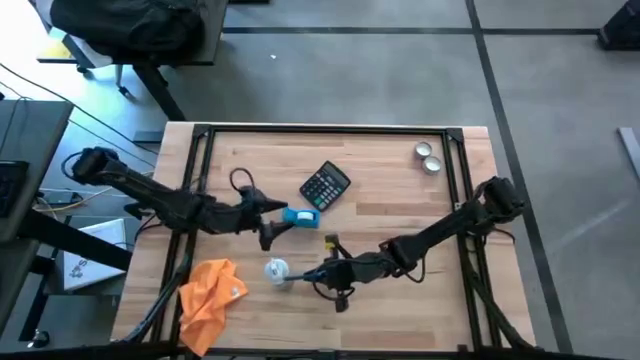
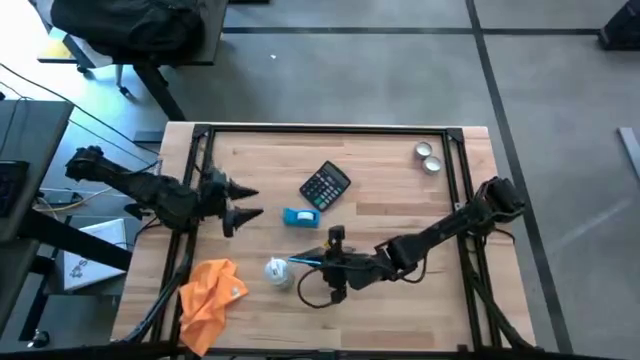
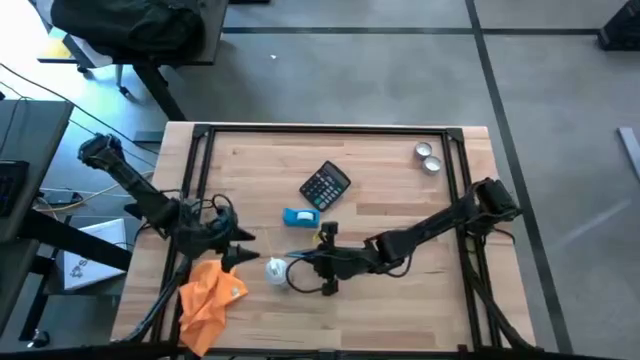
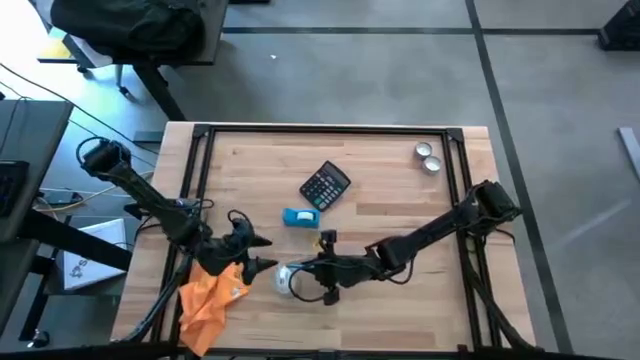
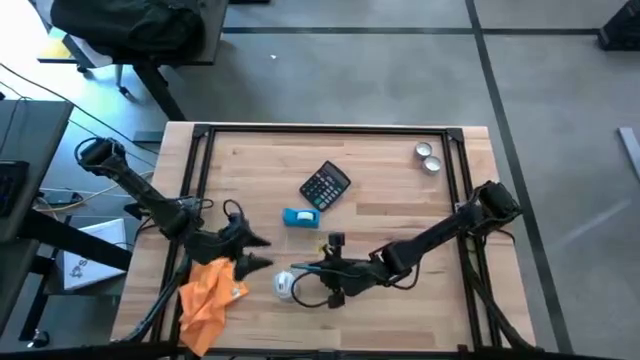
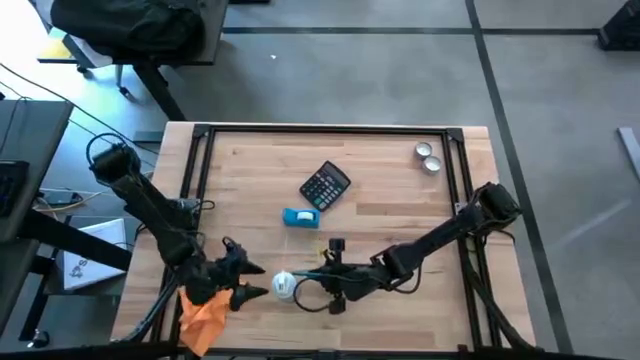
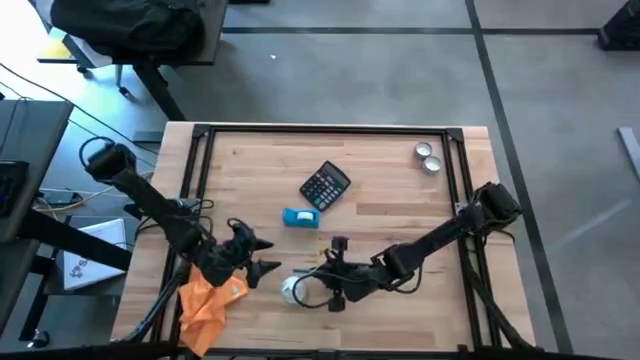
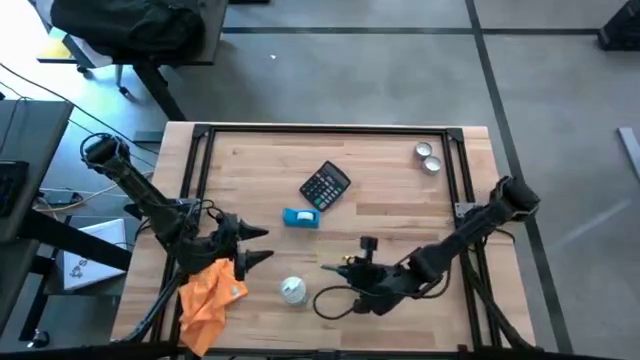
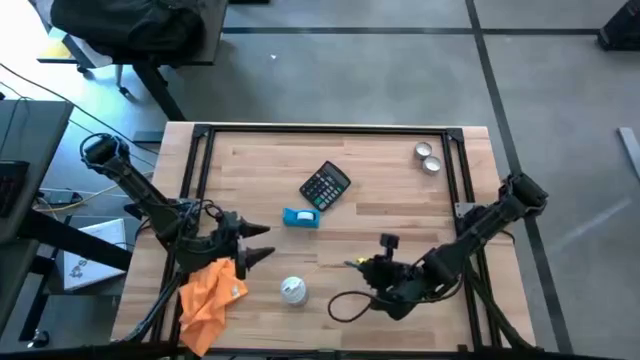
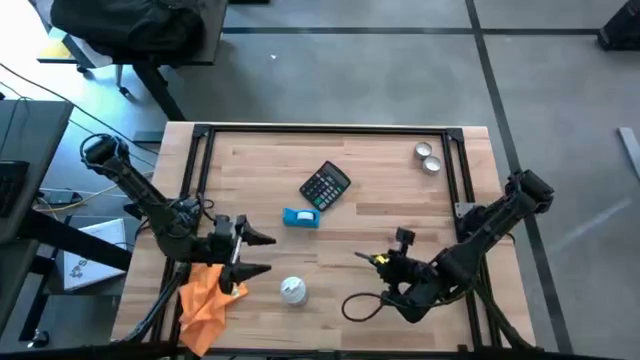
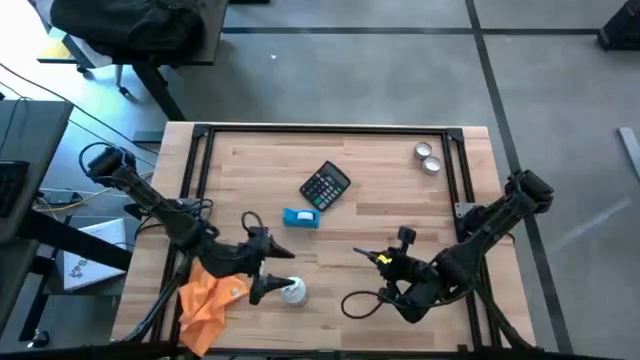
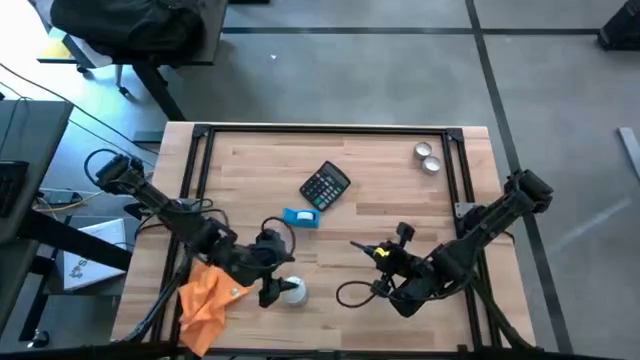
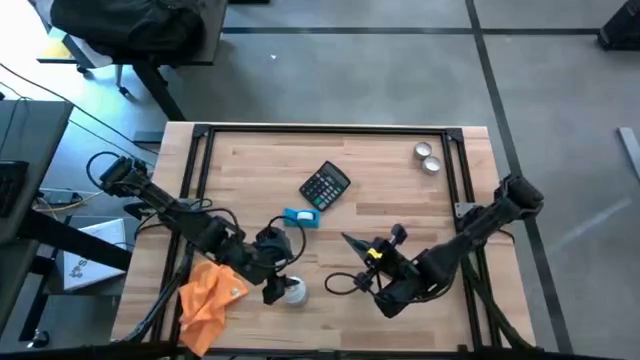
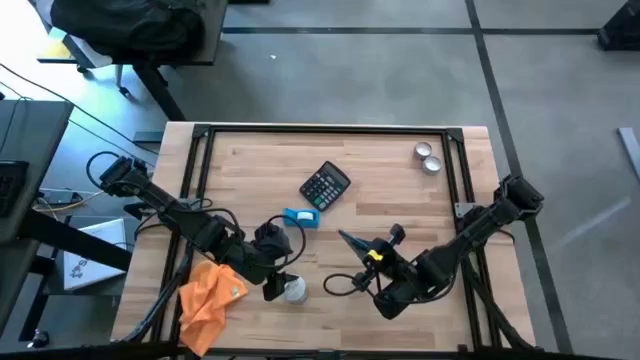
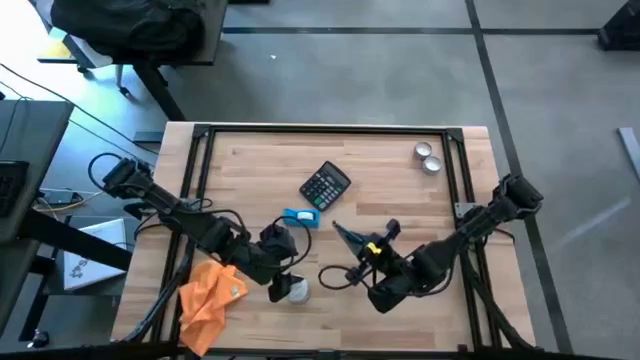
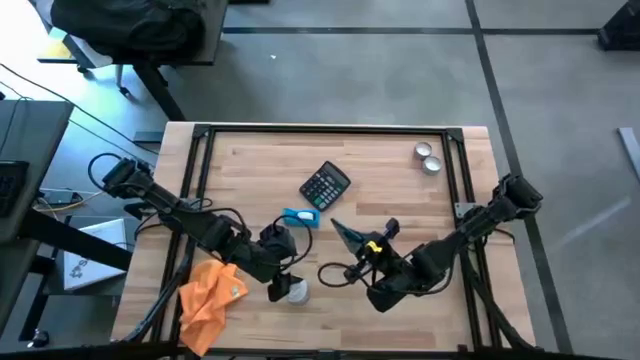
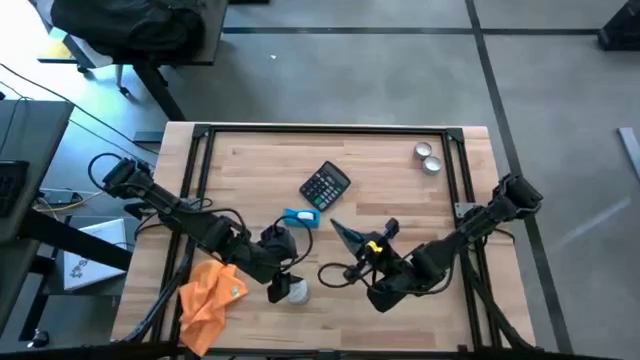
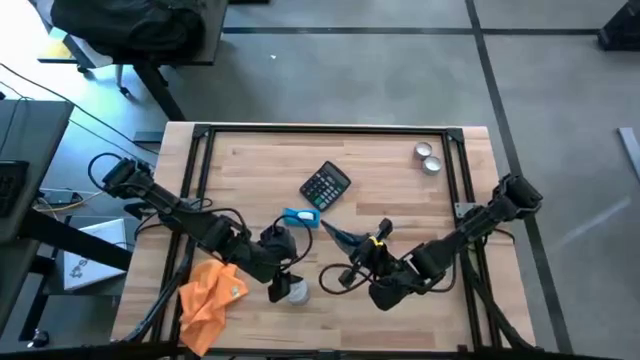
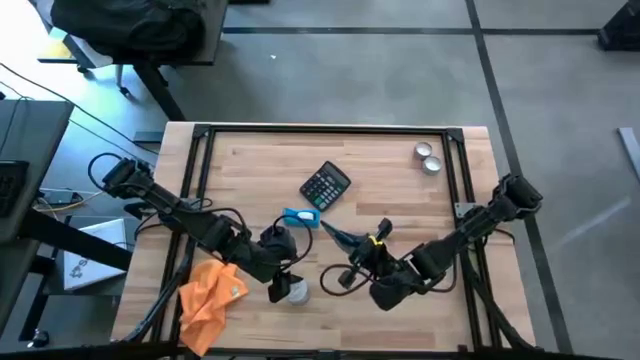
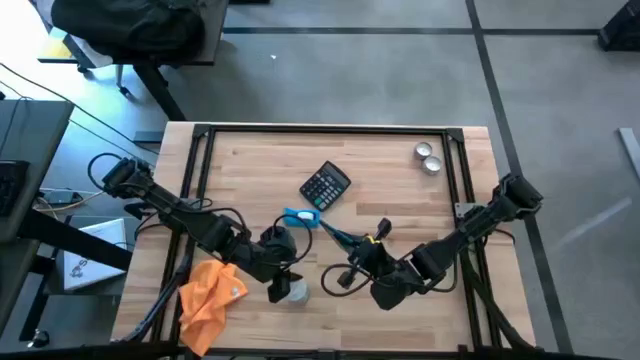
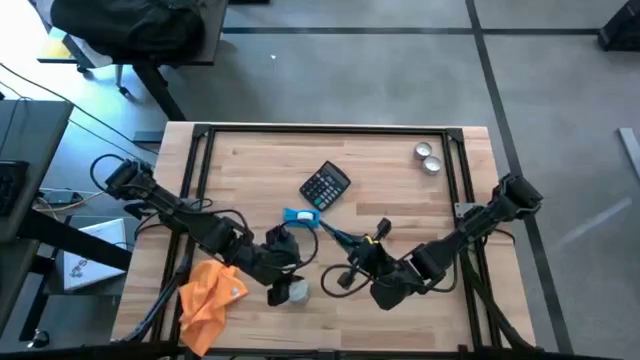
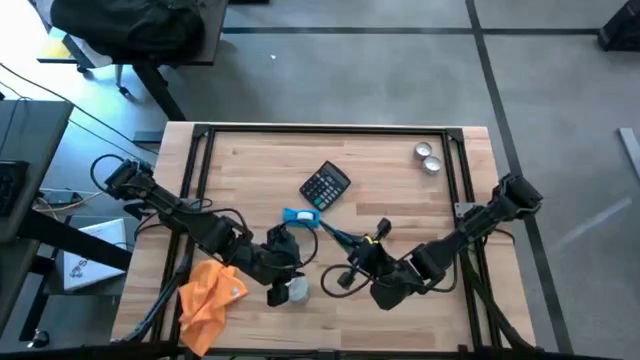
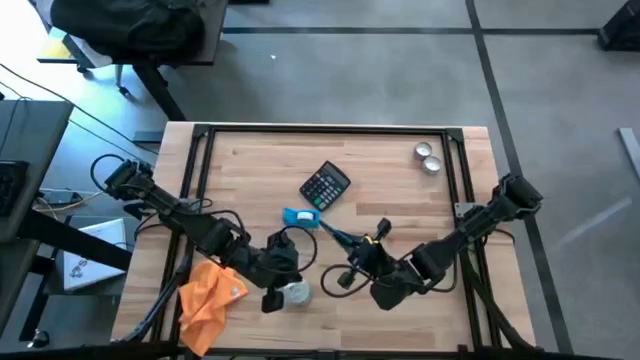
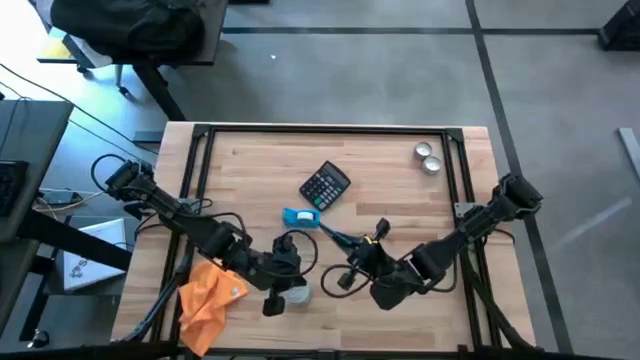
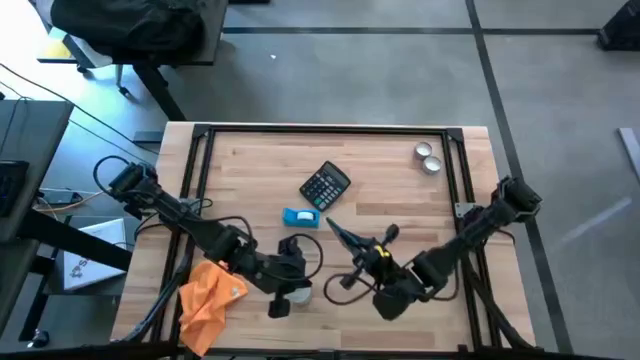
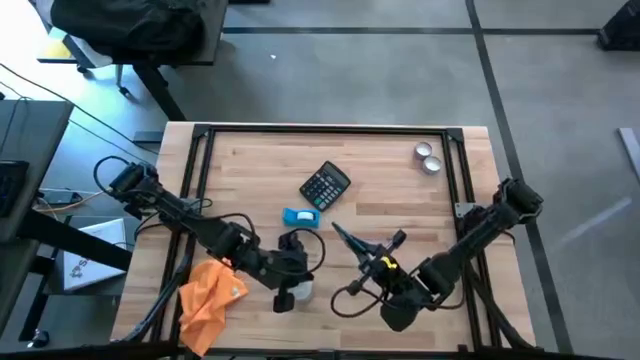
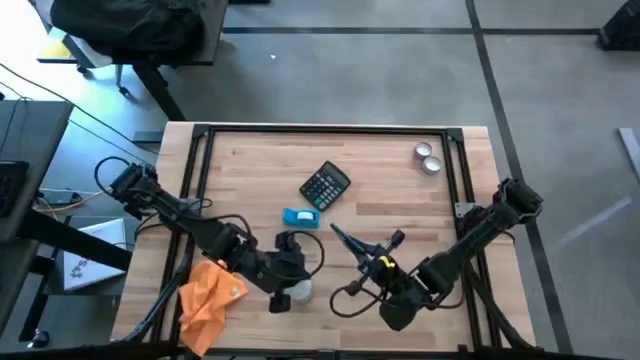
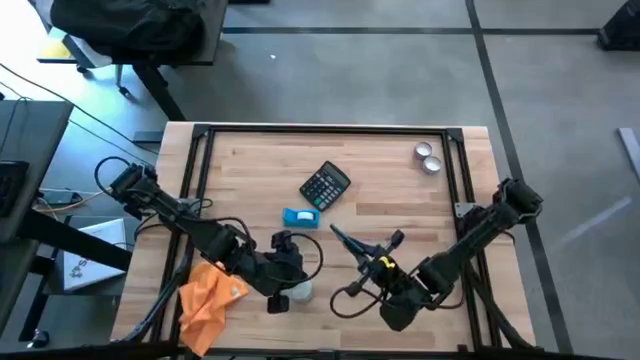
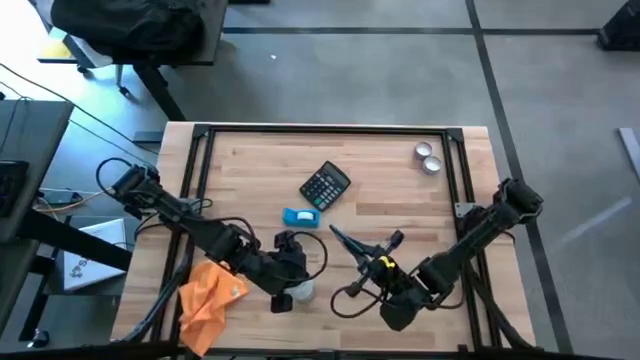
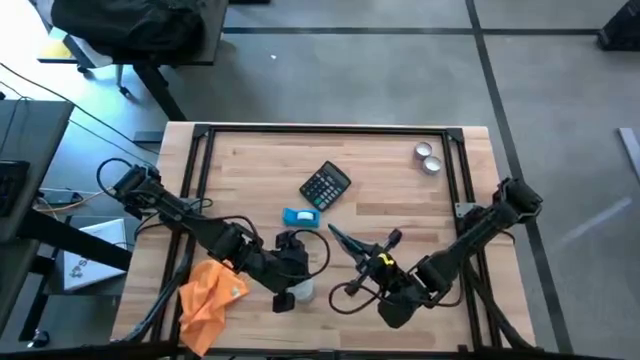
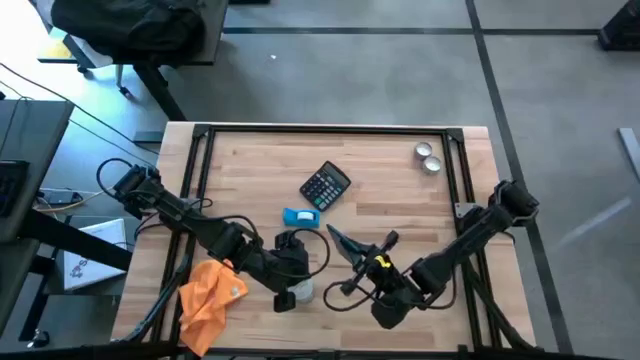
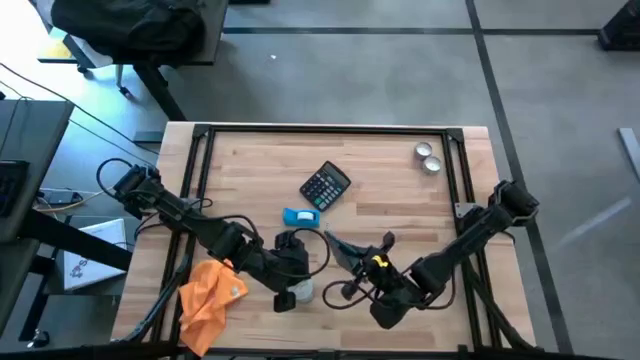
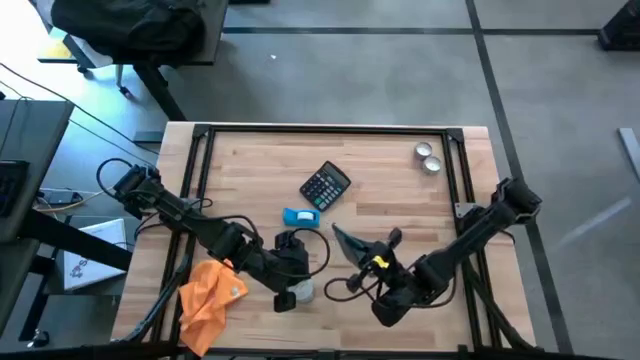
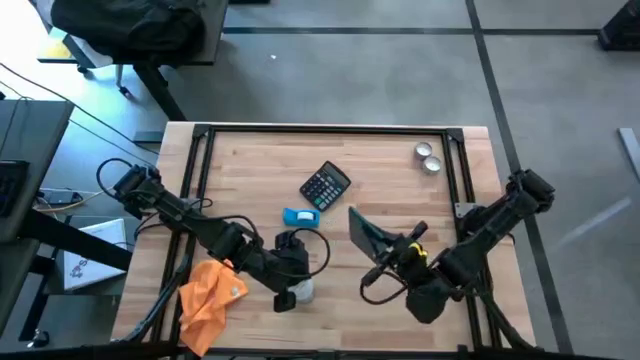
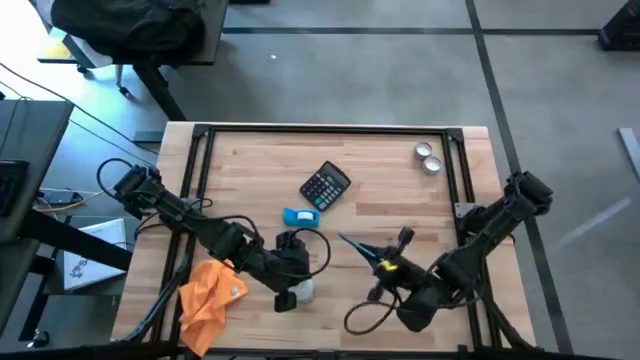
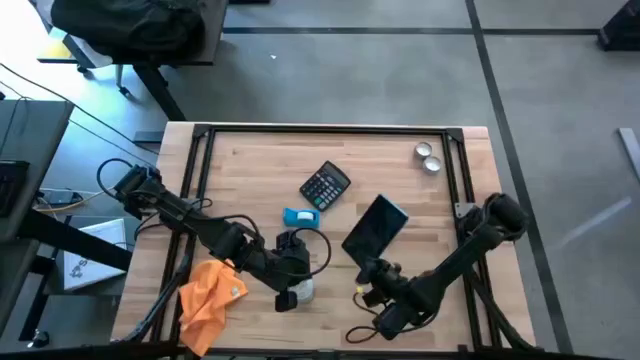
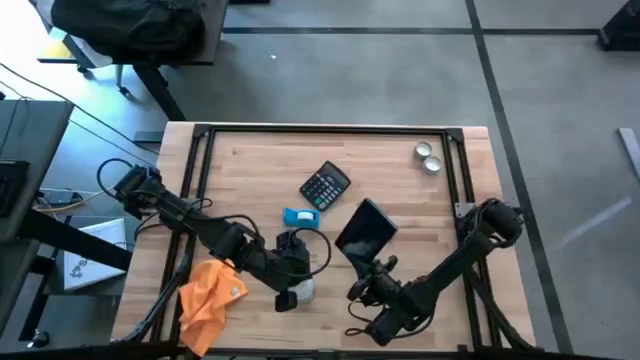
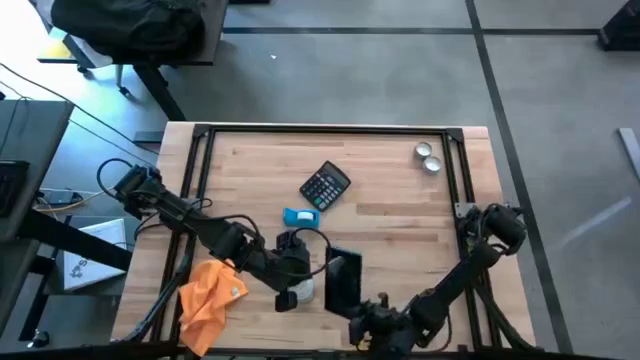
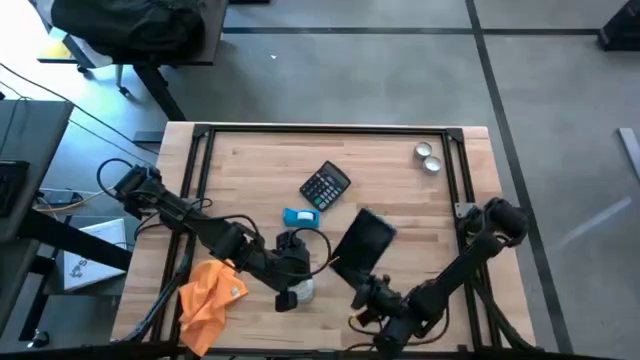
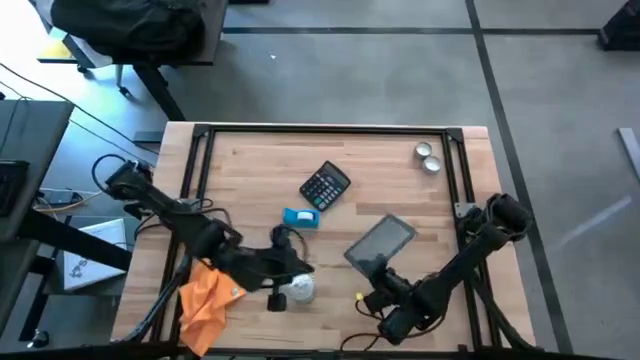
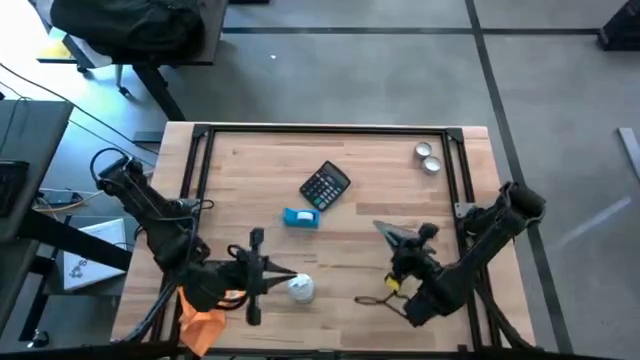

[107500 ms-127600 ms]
Task: Apply microfiber cloth
Spray the cellphone using the white spray bottle
